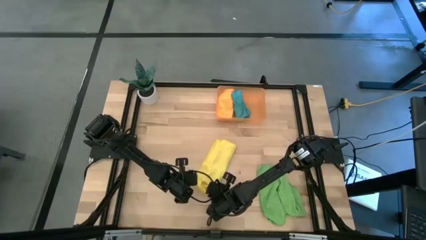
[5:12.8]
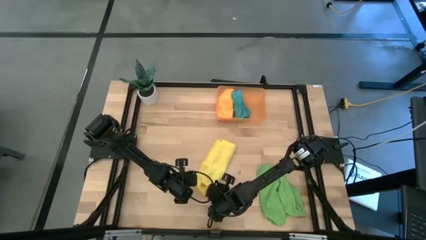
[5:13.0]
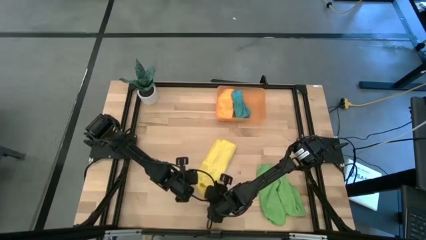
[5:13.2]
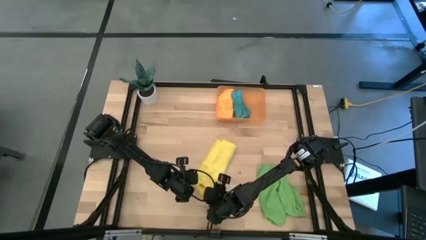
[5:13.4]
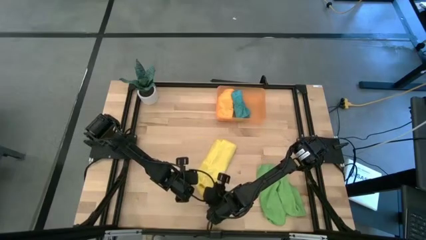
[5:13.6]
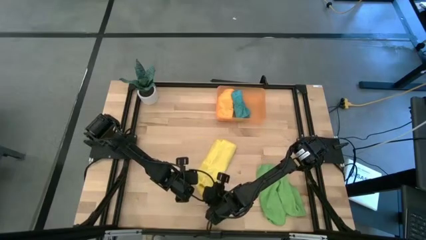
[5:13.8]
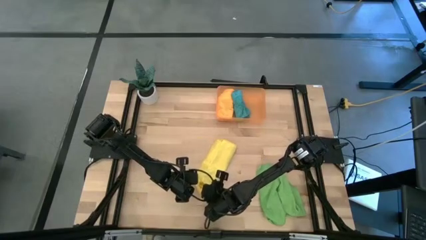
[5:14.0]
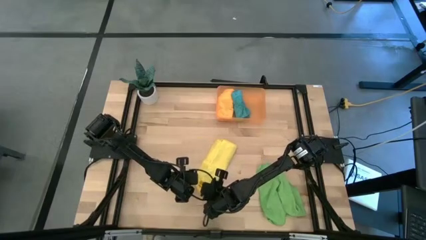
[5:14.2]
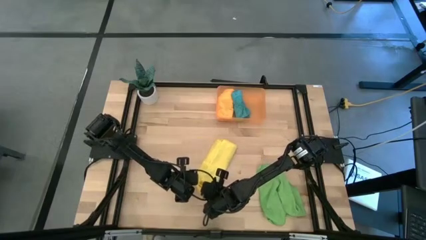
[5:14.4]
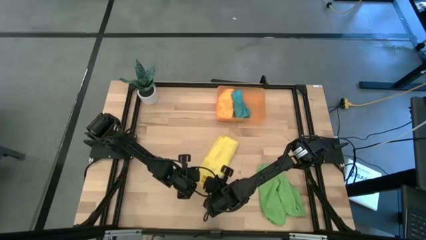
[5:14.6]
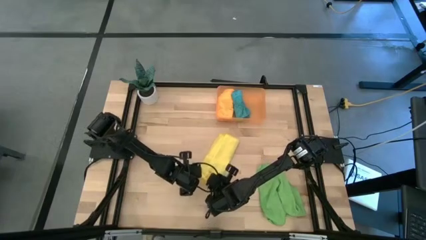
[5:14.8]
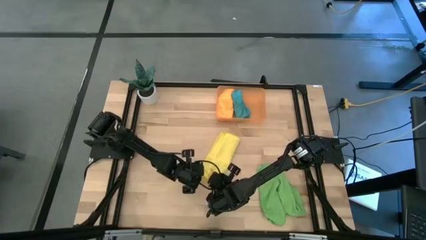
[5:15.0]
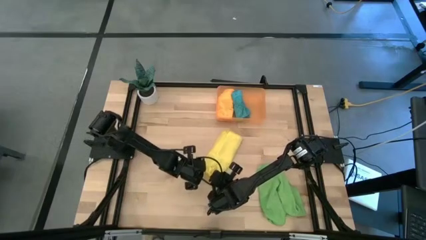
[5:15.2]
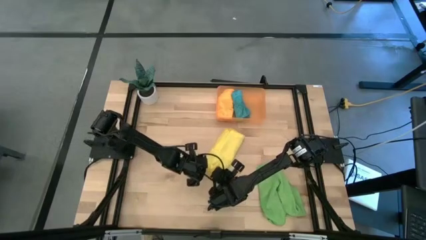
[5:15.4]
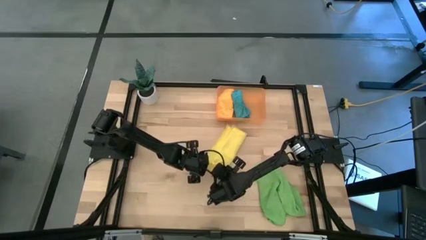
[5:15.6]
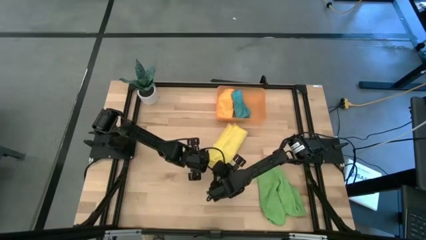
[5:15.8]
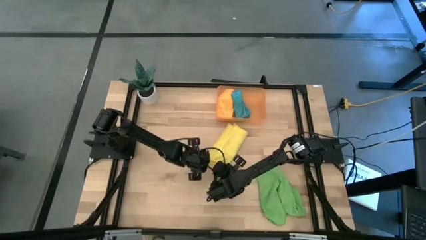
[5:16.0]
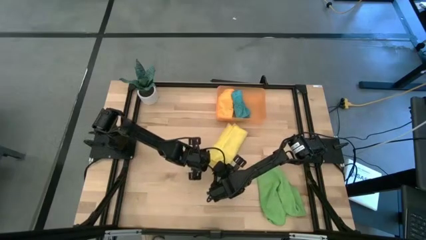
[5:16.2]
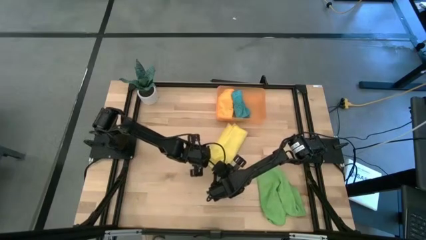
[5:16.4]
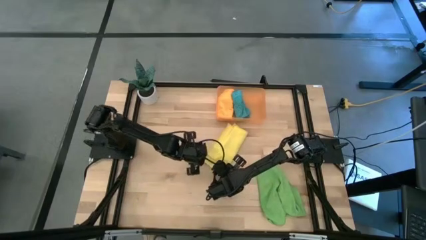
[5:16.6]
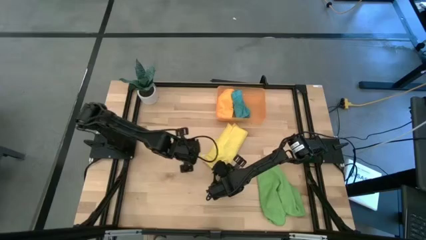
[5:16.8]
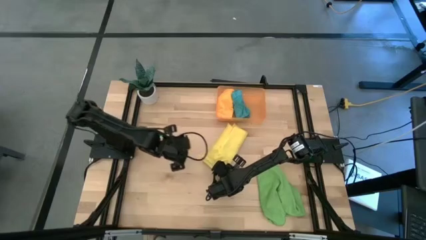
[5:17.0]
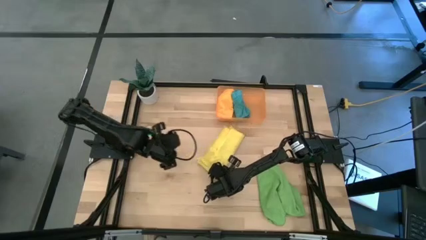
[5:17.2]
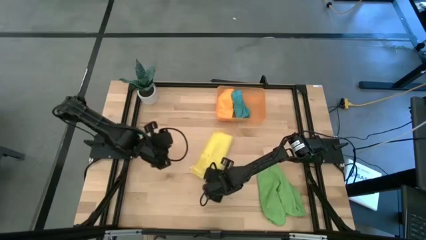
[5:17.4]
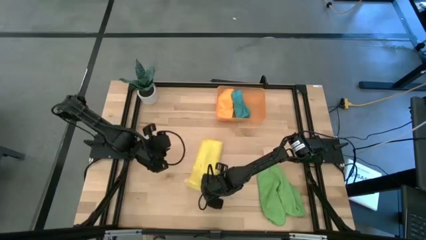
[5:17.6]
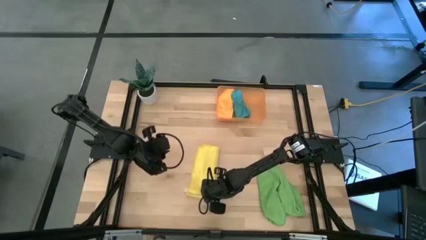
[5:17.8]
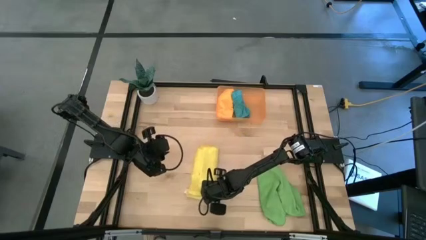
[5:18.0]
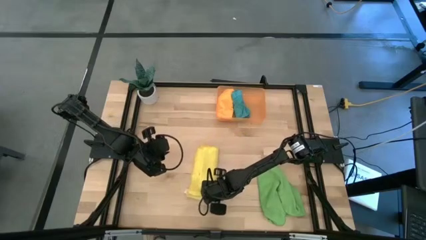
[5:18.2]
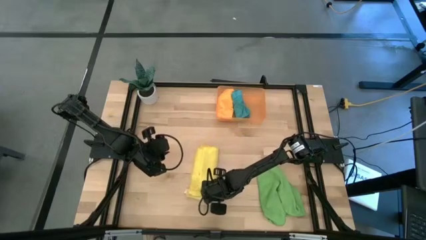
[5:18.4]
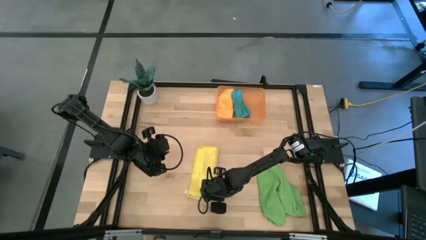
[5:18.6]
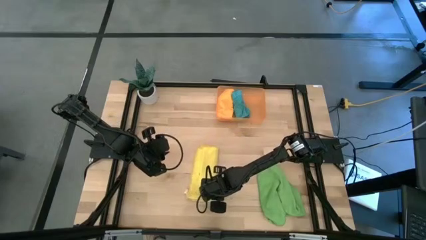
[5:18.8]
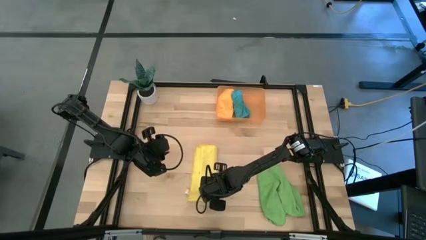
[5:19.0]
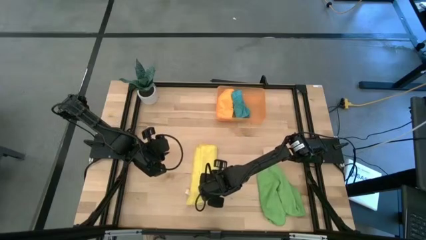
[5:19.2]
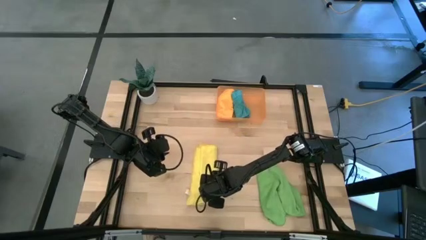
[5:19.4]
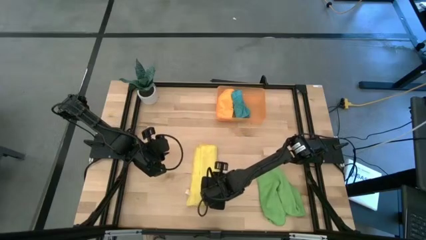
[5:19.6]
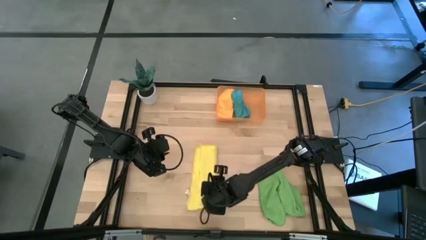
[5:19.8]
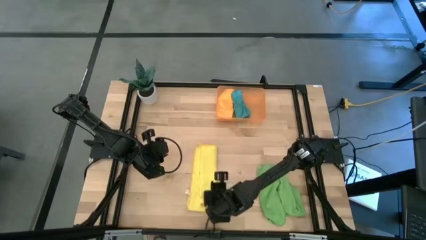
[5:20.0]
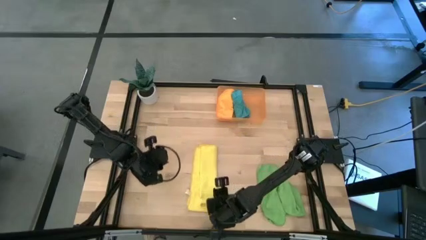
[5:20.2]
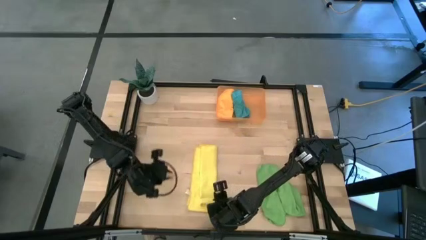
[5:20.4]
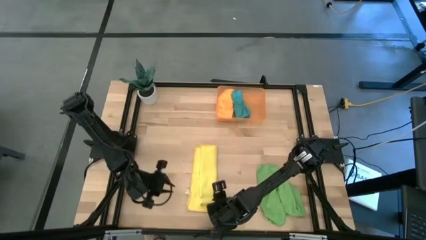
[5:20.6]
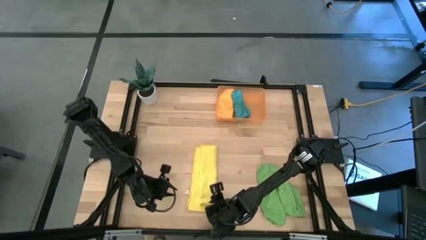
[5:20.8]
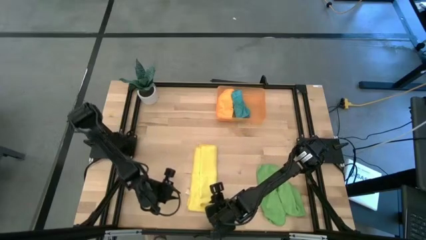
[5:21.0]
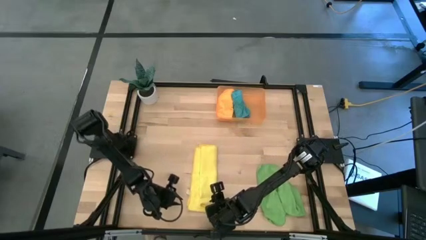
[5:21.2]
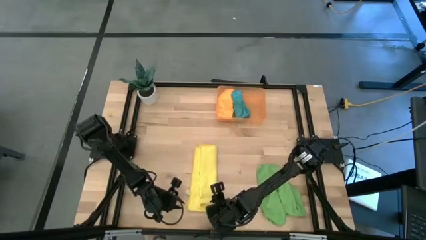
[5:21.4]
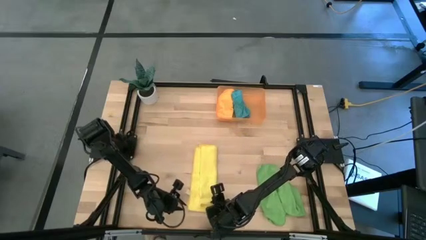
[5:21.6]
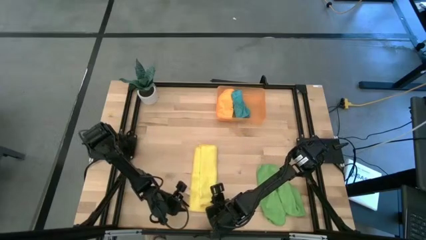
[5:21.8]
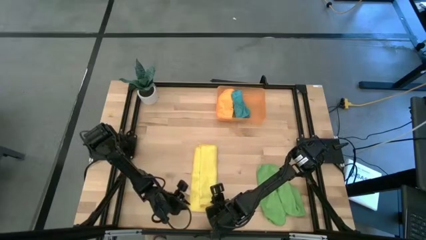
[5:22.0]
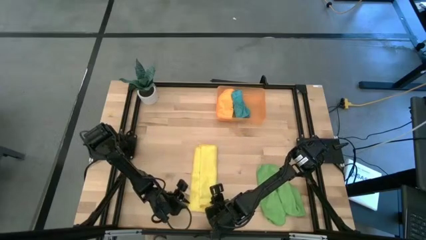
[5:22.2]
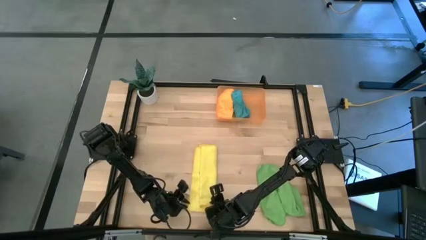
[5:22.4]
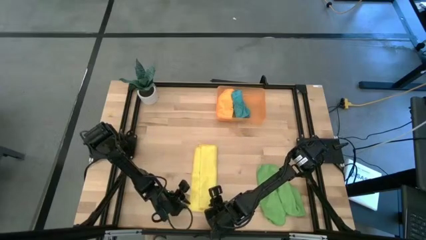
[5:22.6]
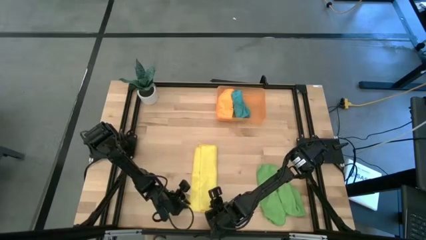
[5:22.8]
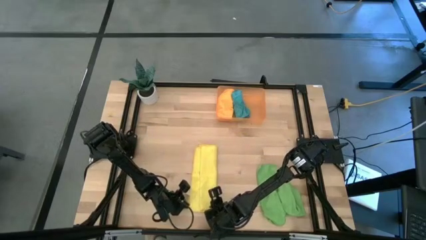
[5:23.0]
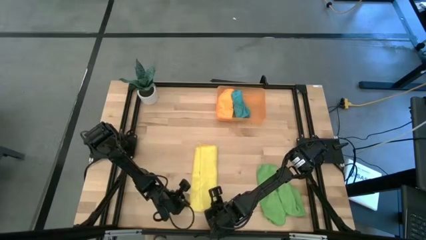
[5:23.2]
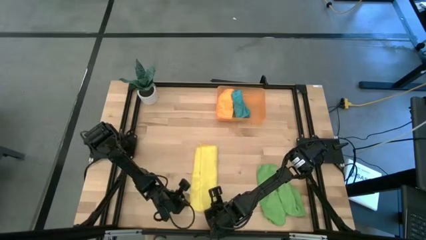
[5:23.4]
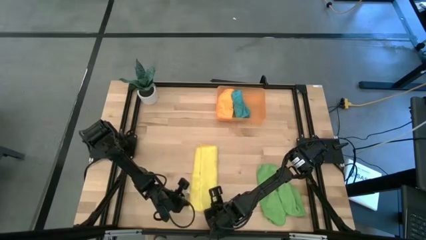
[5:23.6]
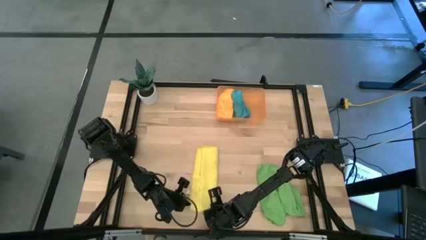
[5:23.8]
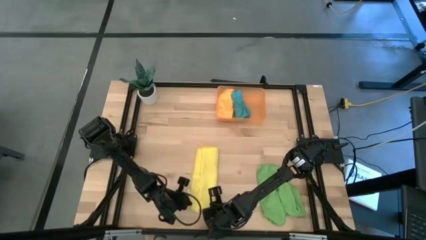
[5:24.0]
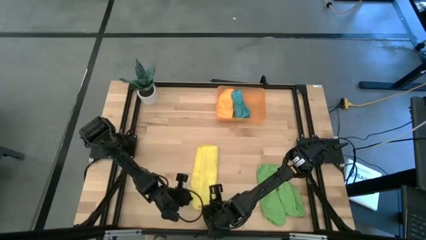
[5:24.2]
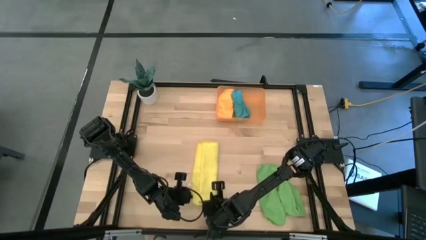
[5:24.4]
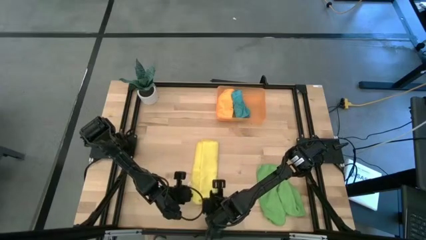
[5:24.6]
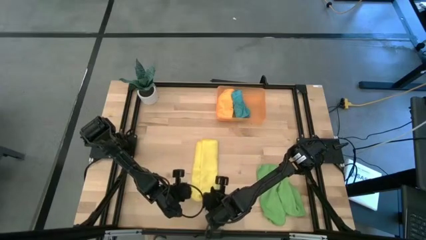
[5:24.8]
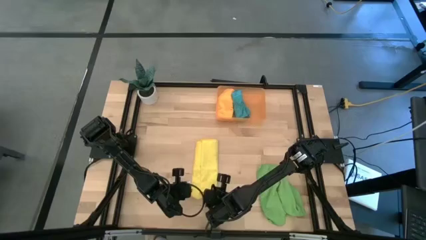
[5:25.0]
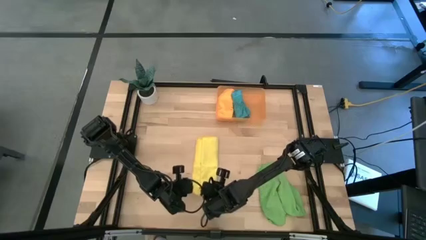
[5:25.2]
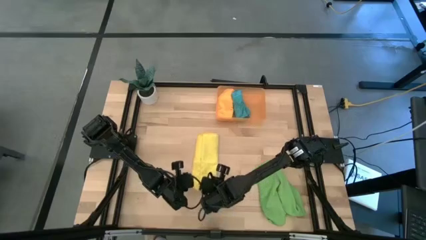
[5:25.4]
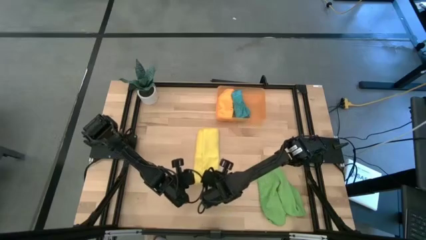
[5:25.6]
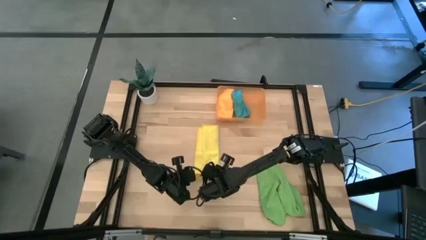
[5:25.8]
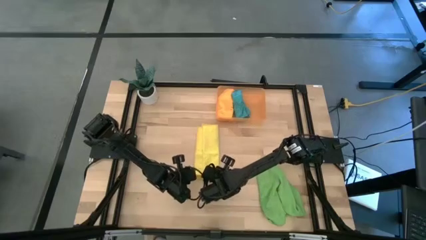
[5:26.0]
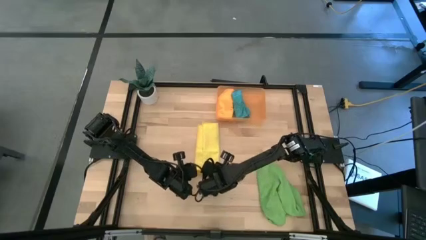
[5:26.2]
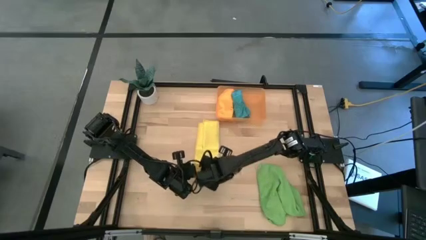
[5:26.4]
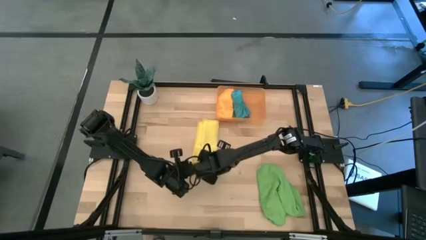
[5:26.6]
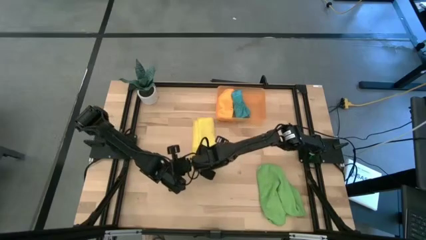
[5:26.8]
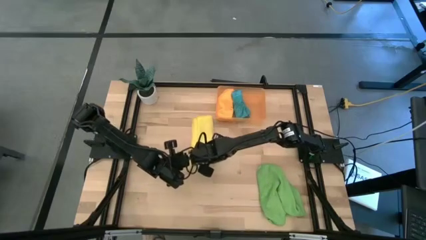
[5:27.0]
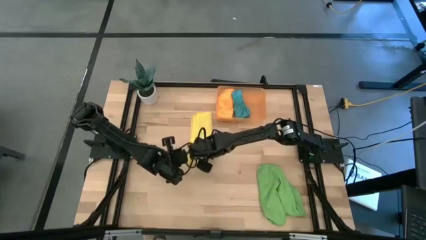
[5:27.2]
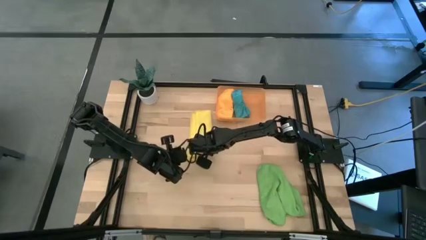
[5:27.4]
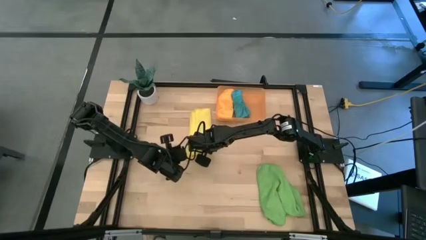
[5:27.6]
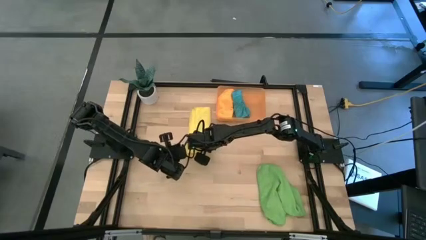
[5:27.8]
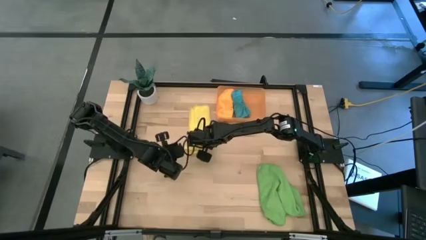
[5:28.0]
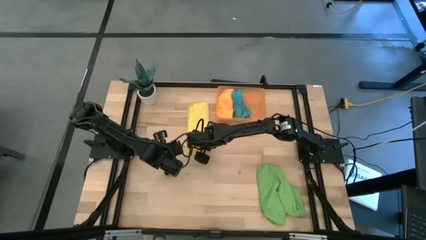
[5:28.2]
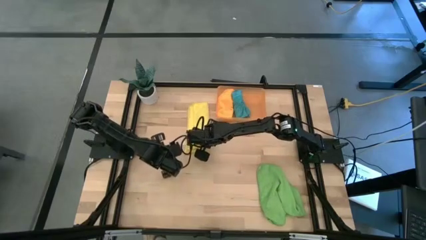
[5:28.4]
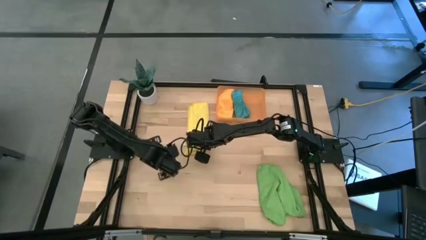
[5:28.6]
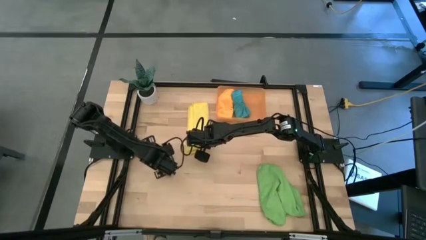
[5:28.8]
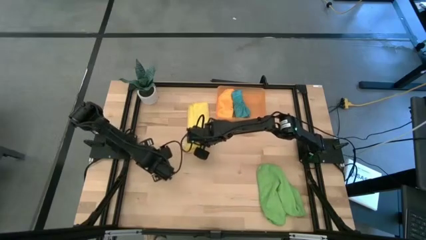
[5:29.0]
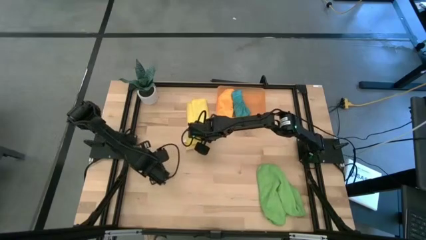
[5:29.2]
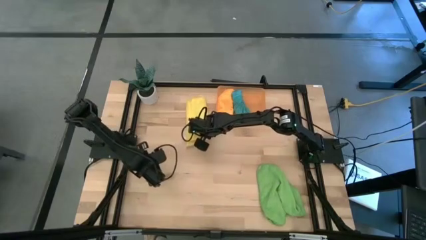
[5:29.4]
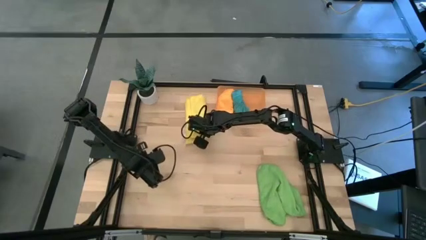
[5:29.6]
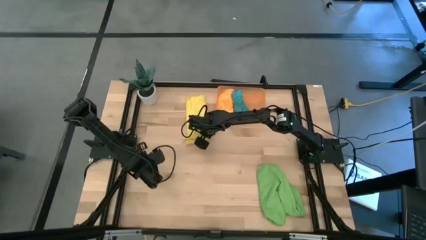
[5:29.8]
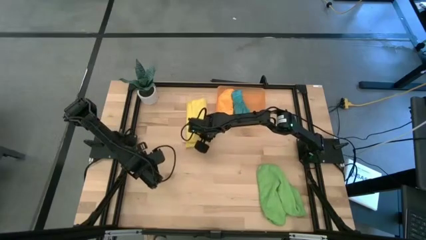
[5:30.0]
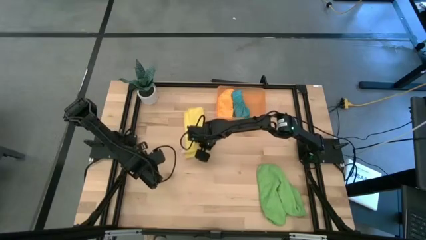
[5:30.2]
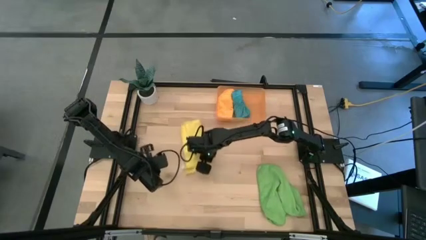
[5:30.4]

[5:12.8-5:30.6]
Task: Roll microfiber towels into tight, uniform cylinder then place into a basket
Roll the yellow microfiber towel
